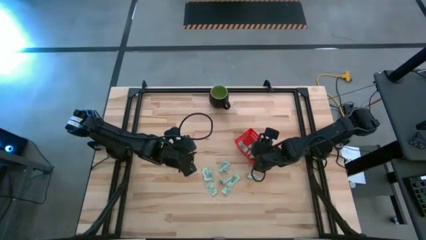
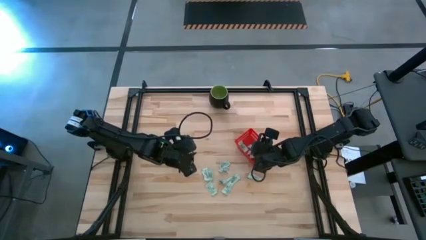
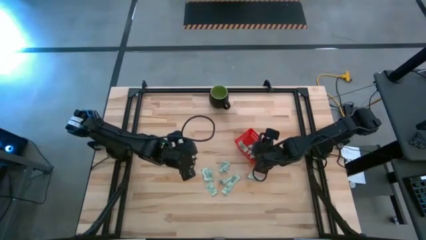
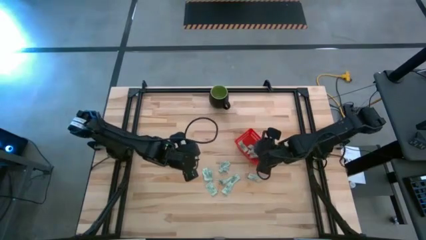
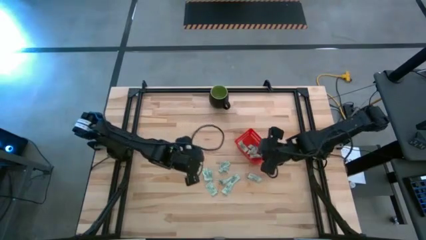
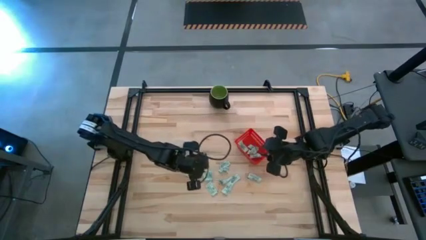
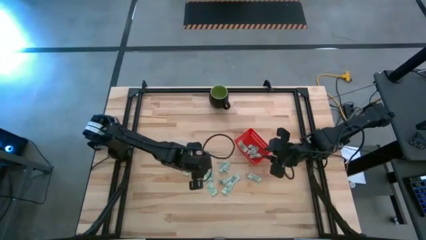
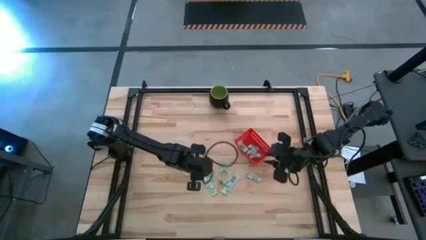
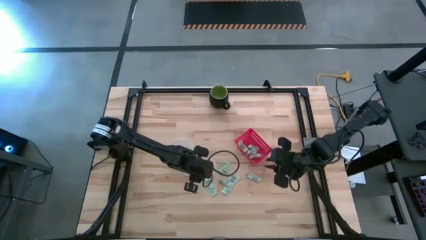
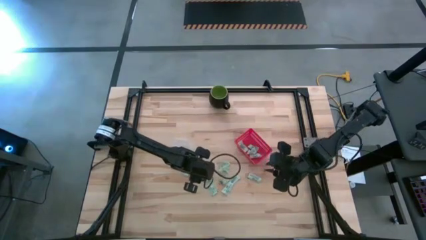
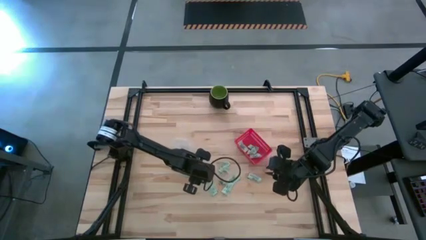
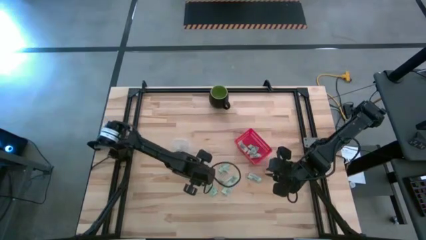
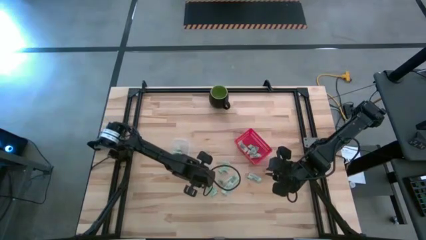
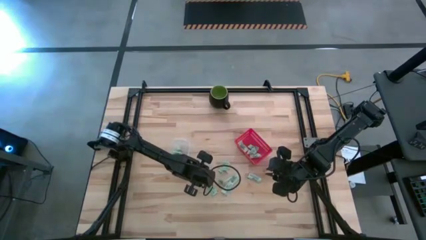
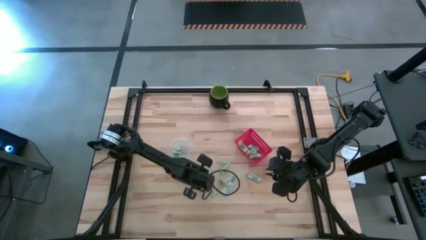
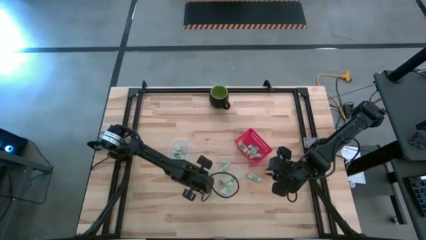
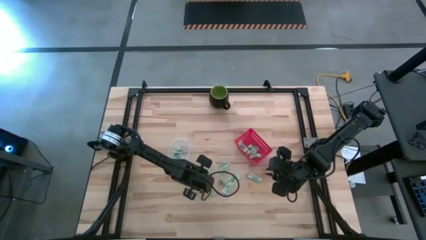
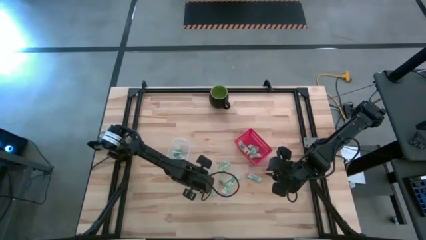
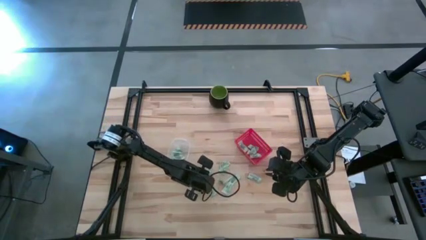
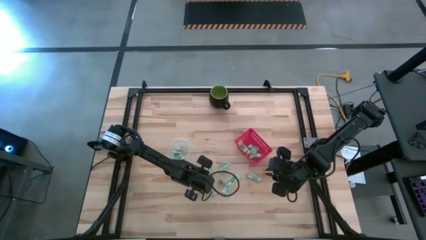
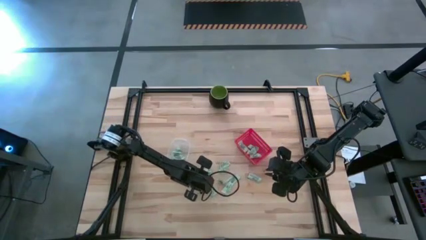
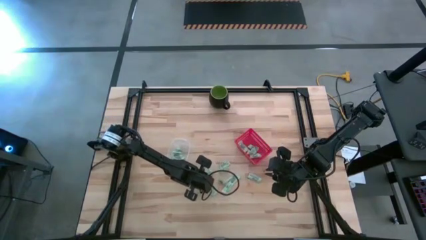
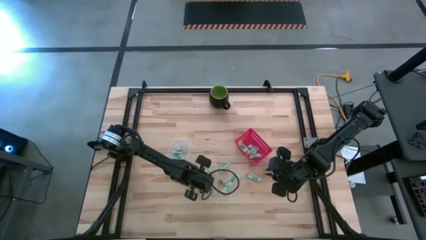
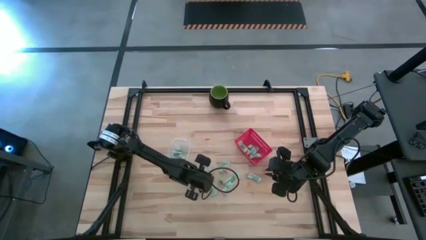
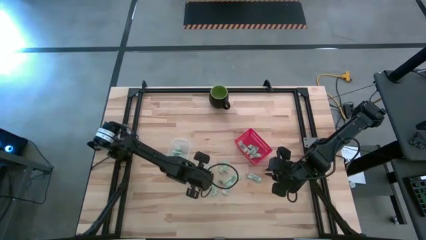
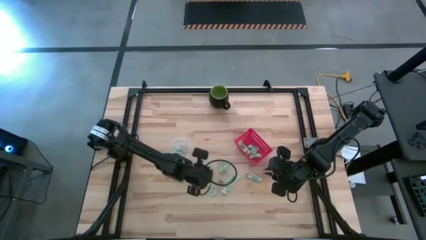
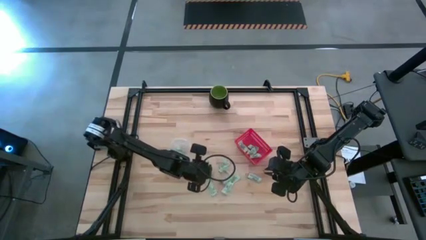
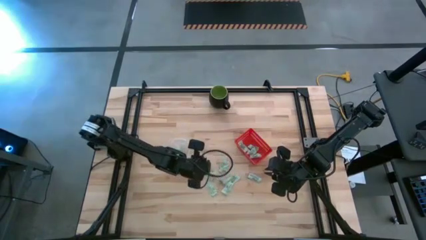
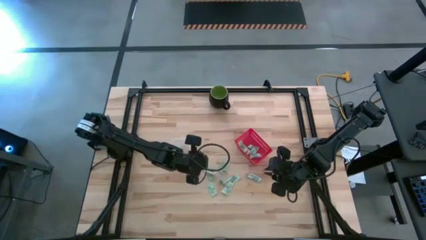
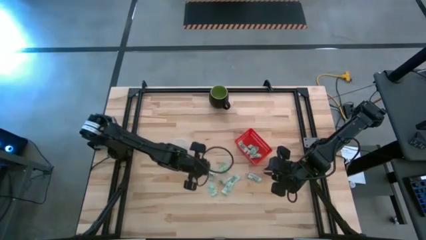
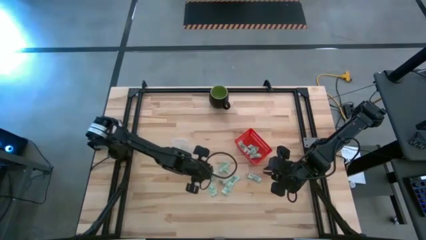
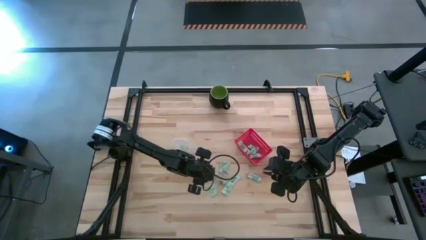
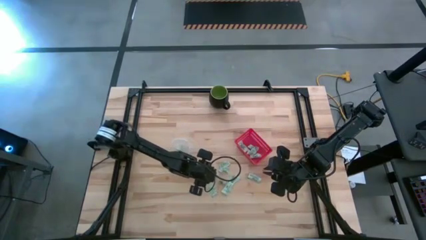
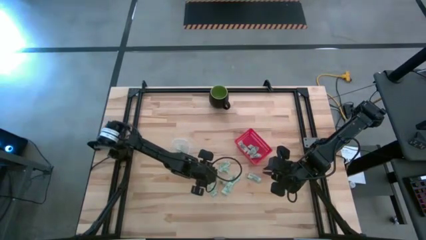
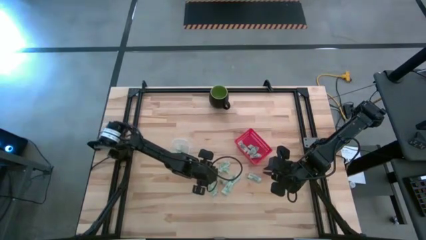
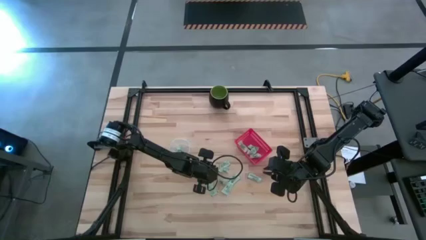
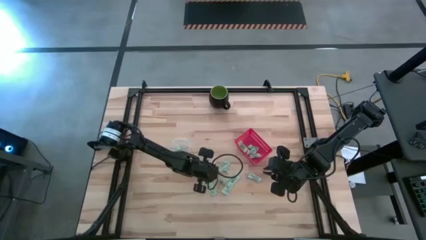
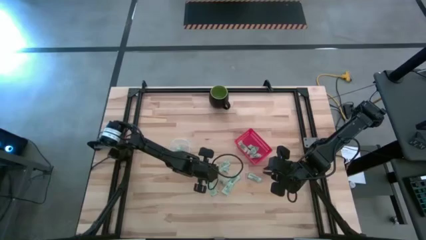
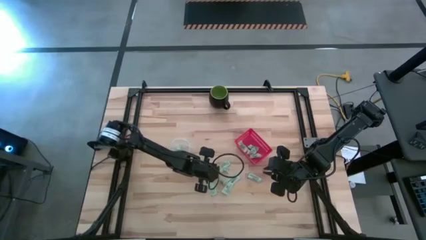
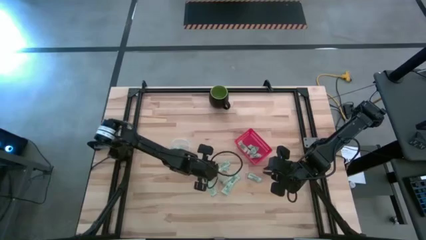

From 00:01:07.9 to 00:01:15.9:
Task: Pick and place items into bin
Put the stevia packet into the transparent bin

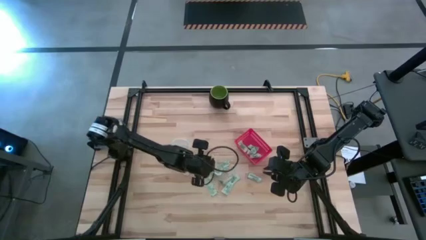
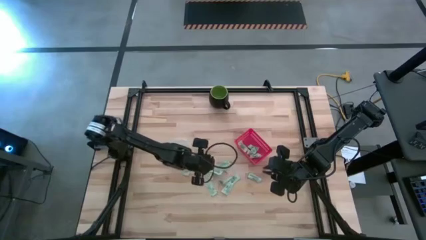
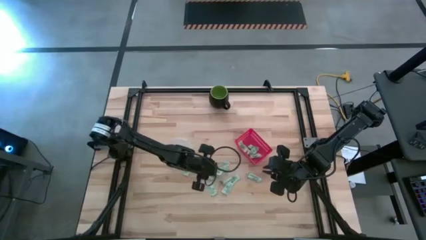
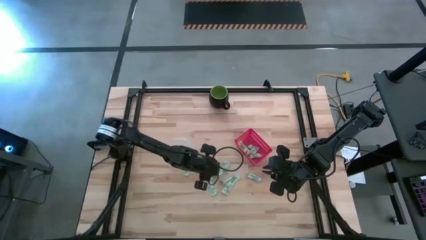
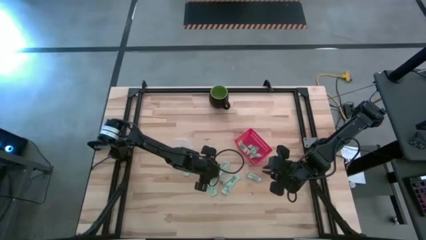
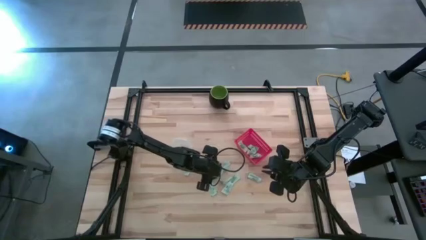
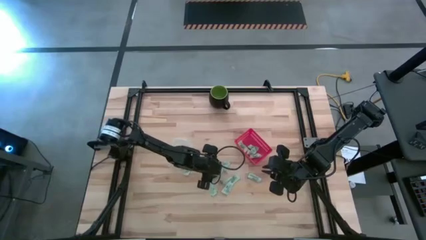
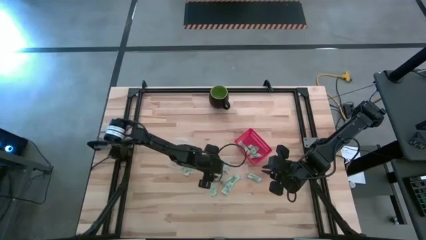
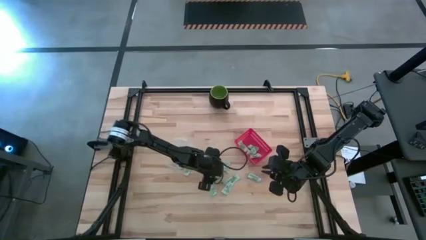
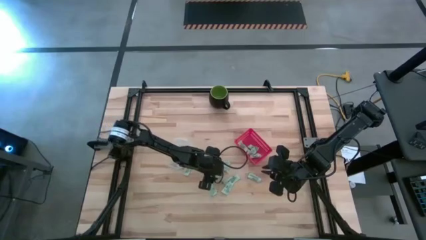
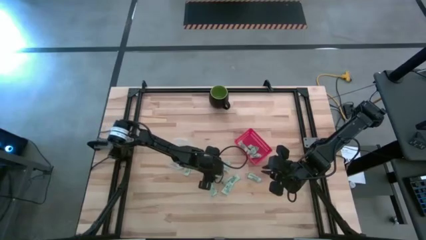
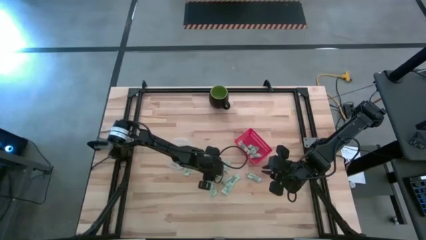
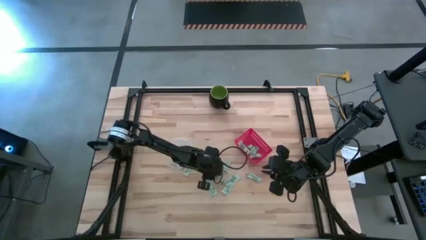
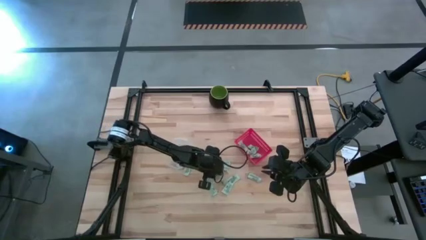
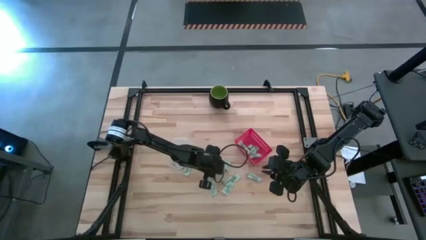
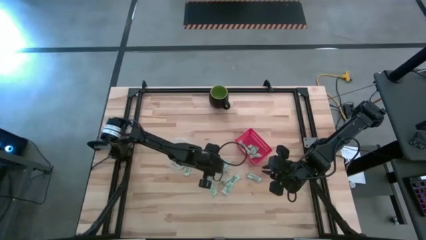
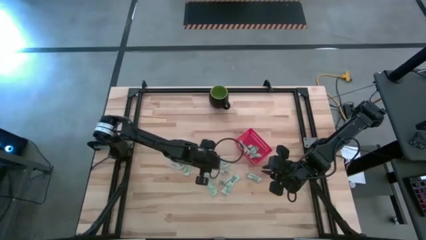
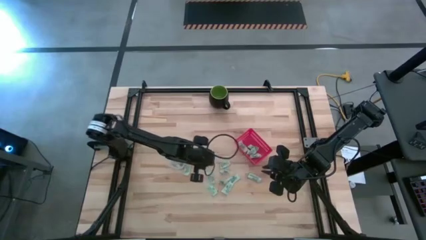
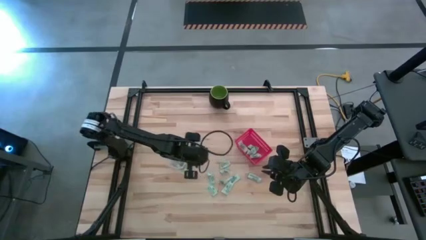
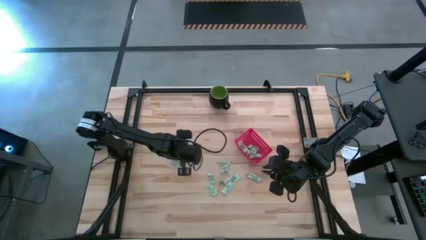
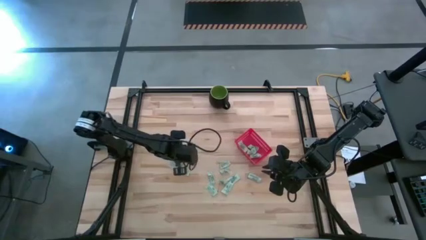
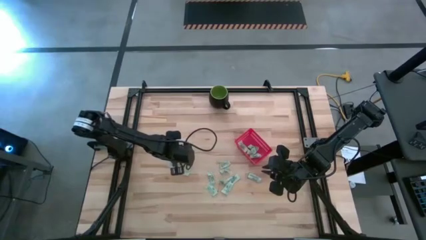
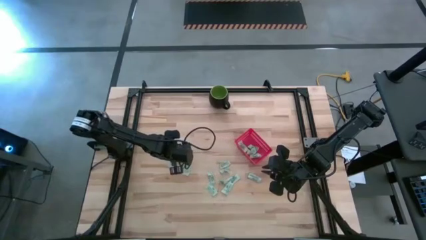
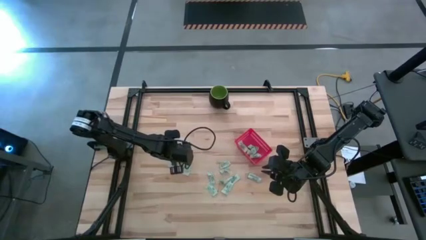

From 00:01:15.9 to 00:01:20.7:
Put the stevia packet into the transparent bin

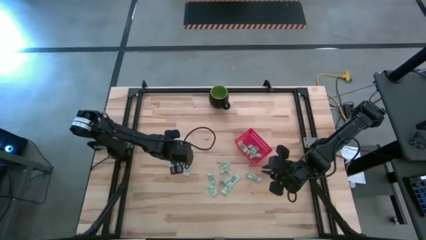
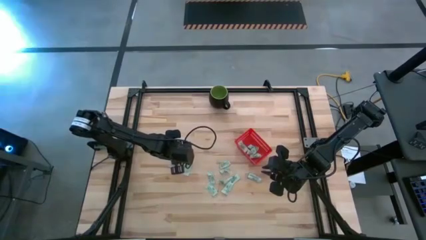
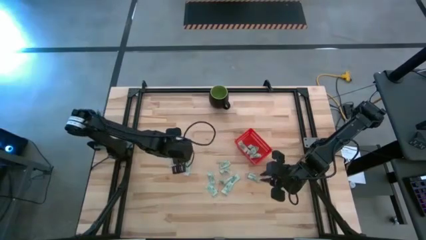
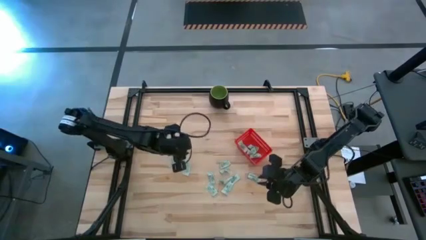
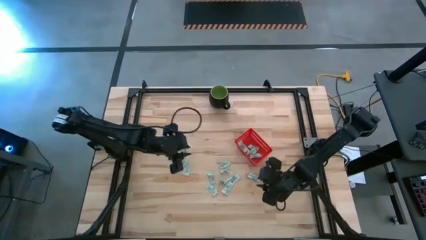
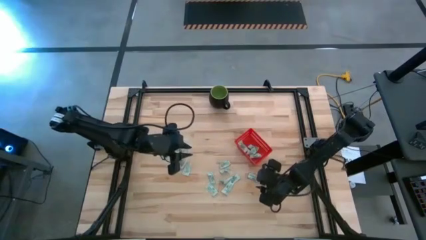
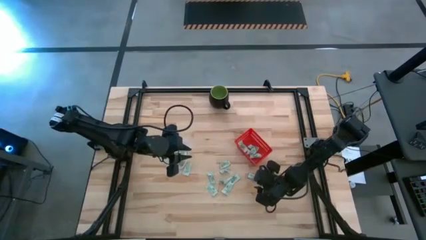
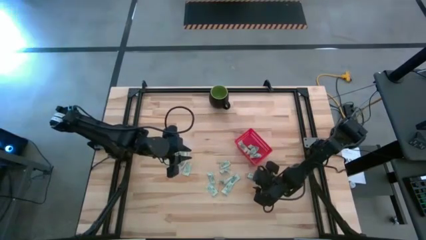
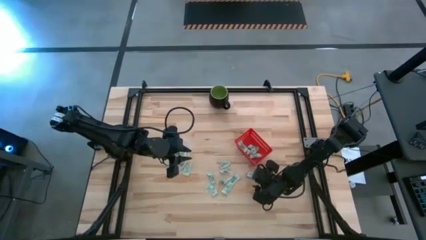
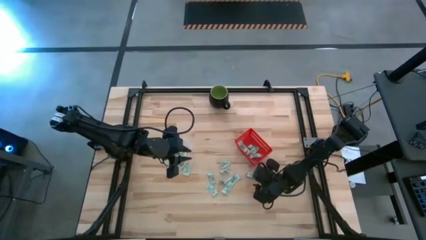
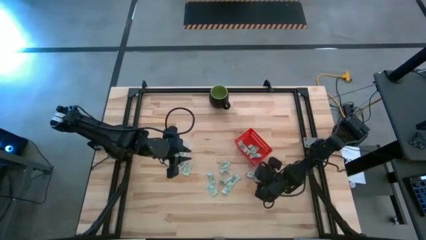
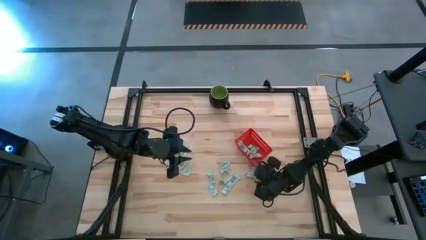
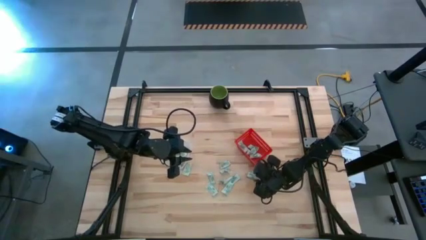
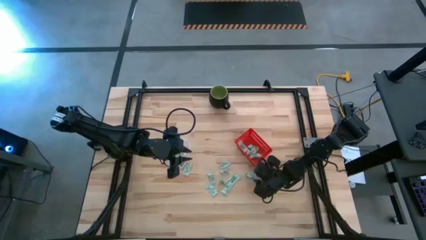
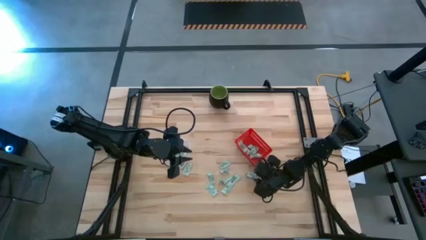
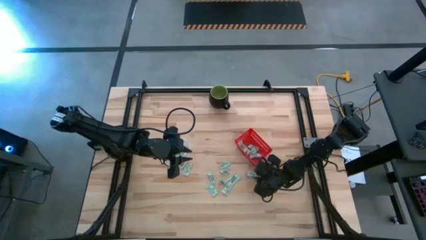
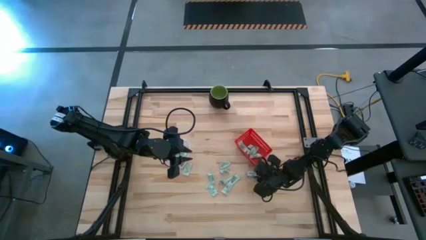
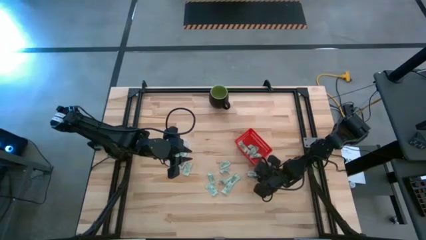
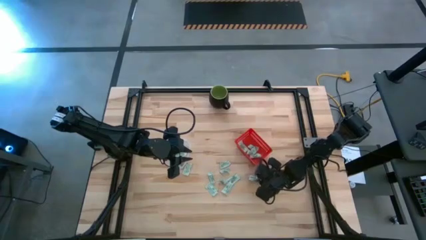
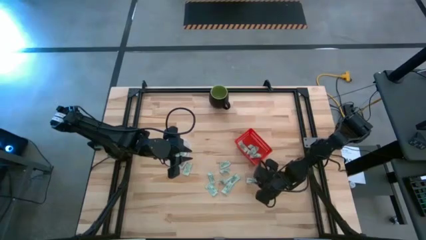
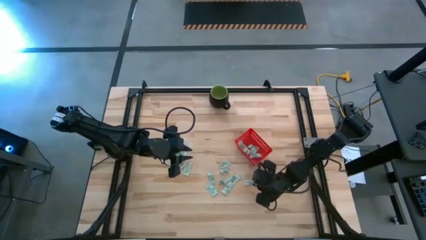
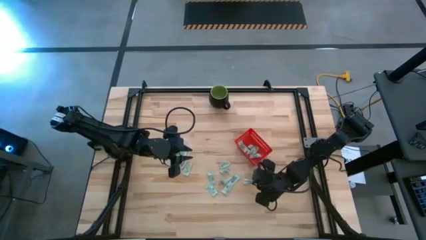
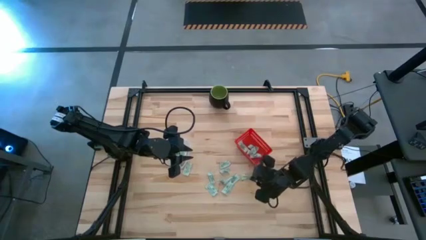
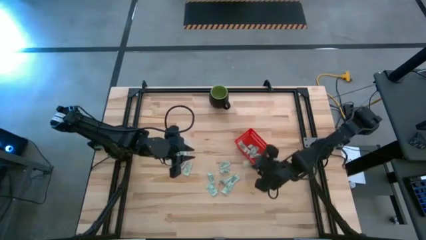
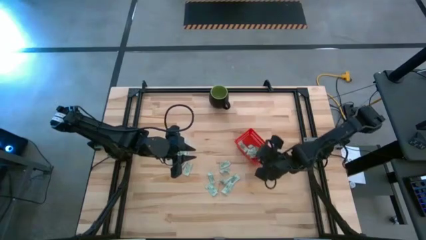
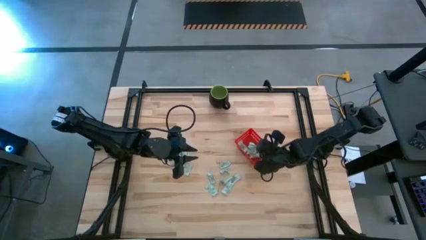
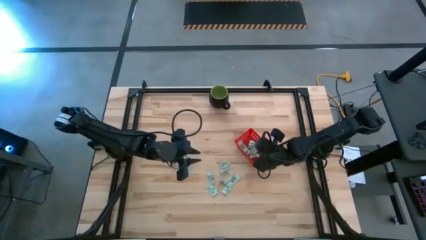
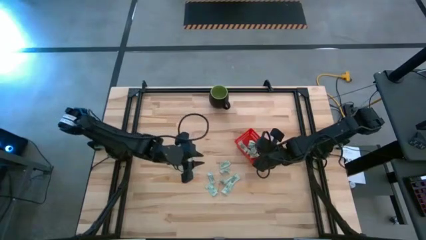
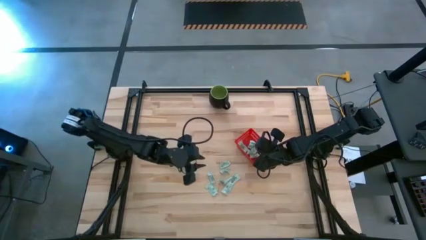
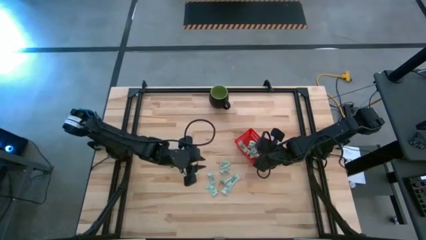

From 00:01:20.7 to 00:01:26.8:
Put the stevia packet into the red basket
